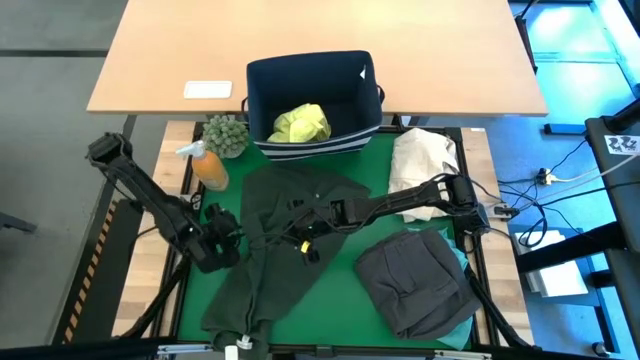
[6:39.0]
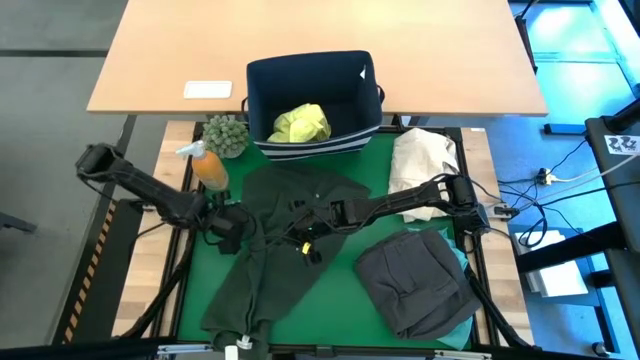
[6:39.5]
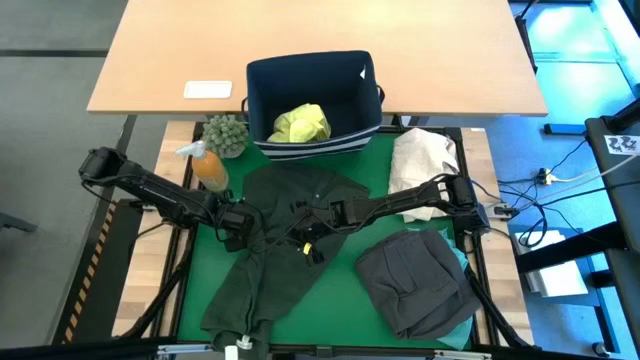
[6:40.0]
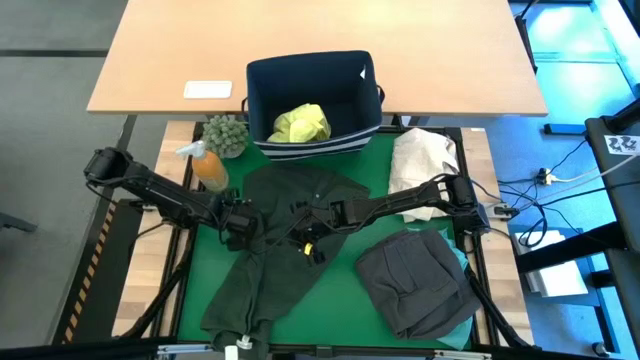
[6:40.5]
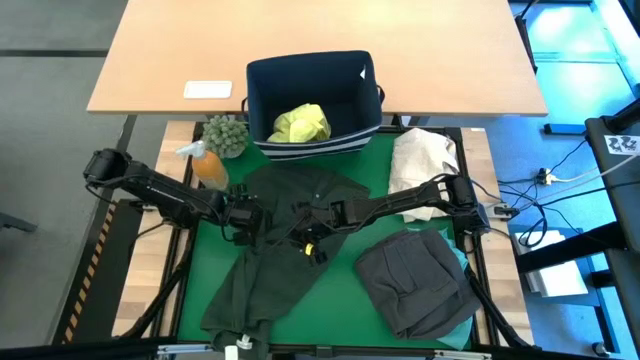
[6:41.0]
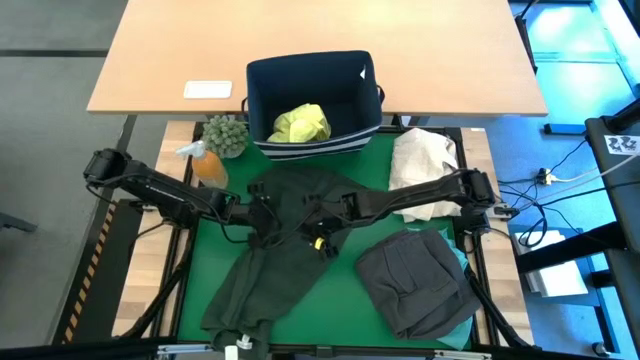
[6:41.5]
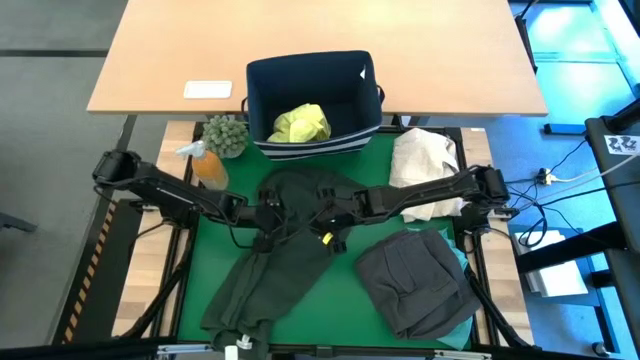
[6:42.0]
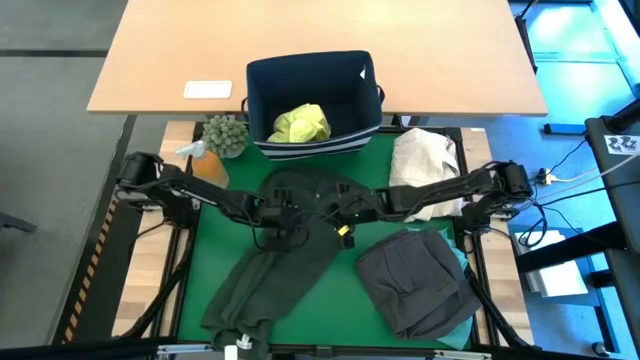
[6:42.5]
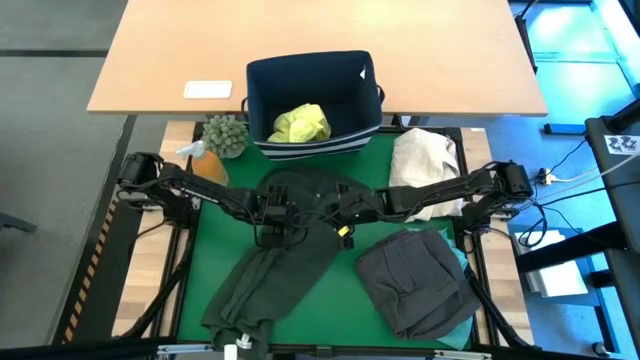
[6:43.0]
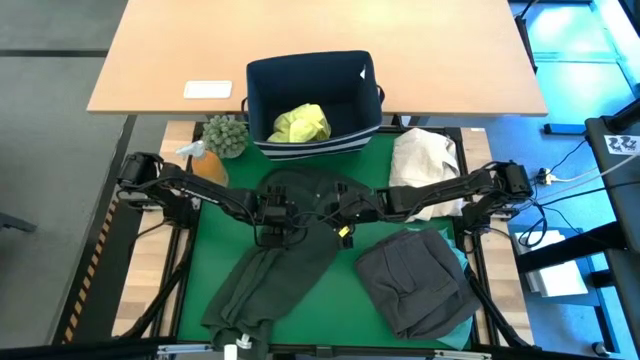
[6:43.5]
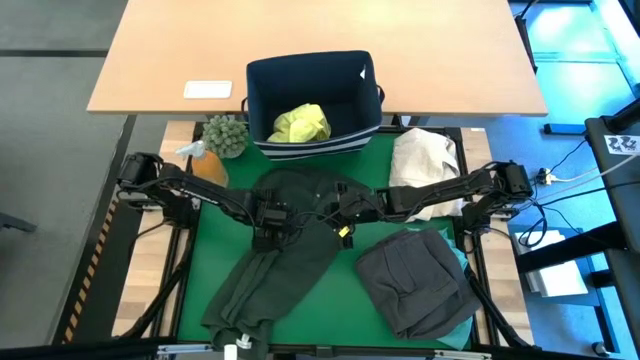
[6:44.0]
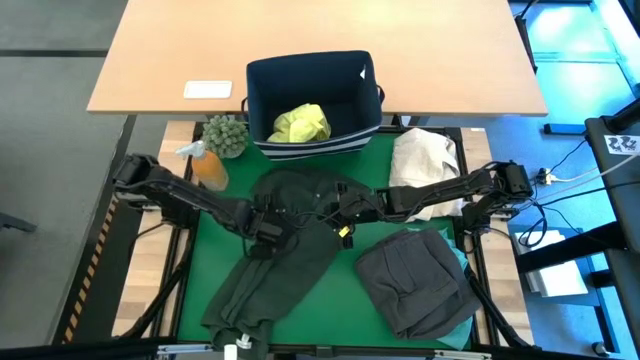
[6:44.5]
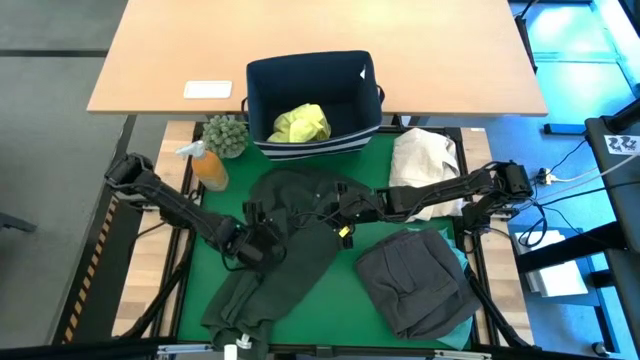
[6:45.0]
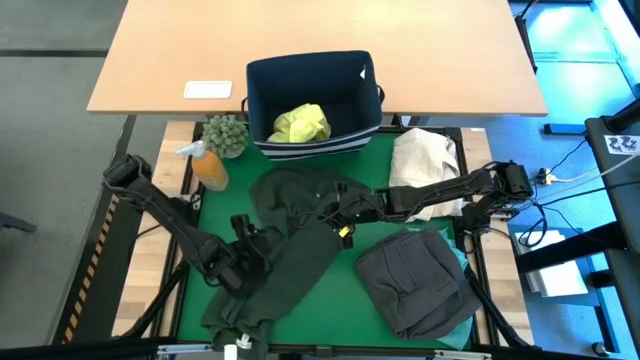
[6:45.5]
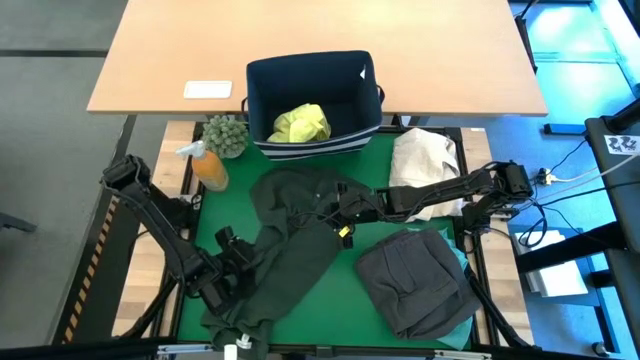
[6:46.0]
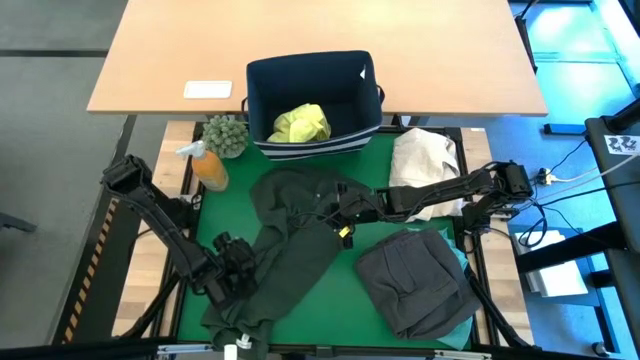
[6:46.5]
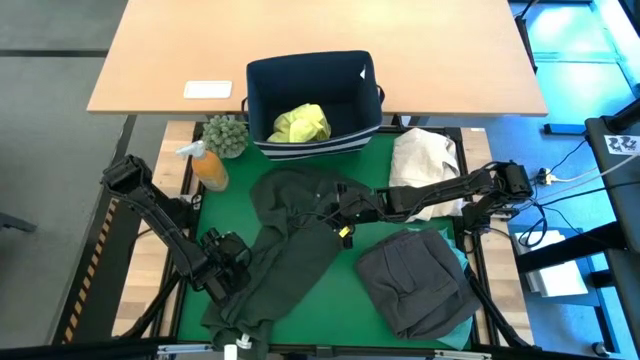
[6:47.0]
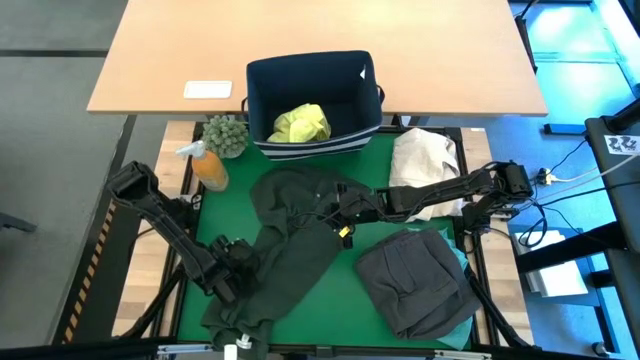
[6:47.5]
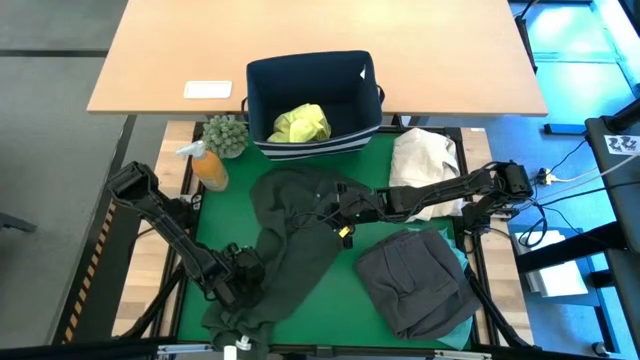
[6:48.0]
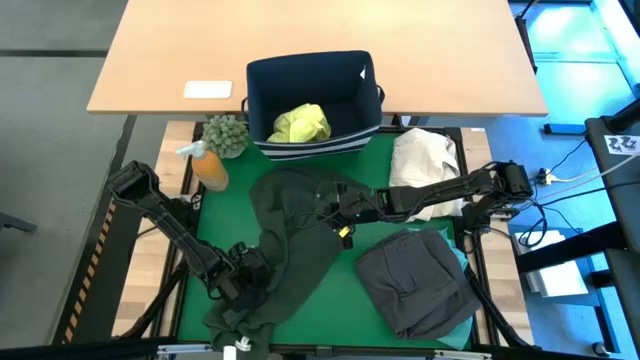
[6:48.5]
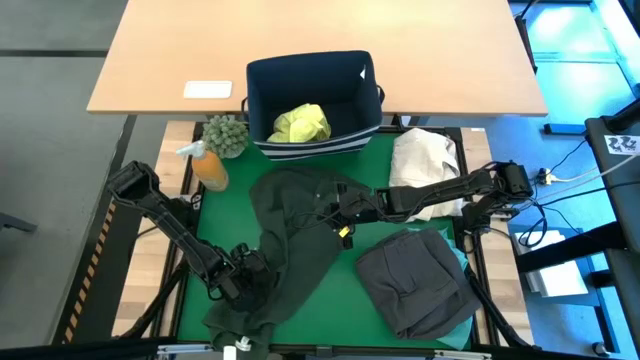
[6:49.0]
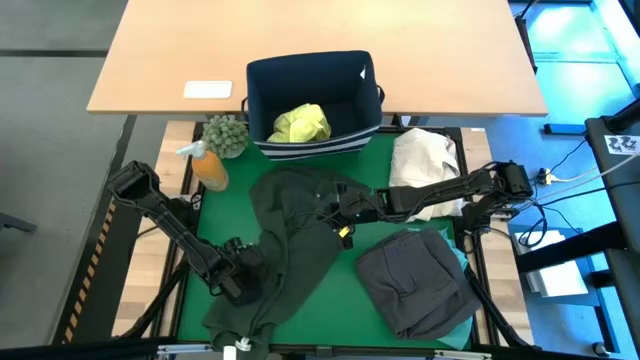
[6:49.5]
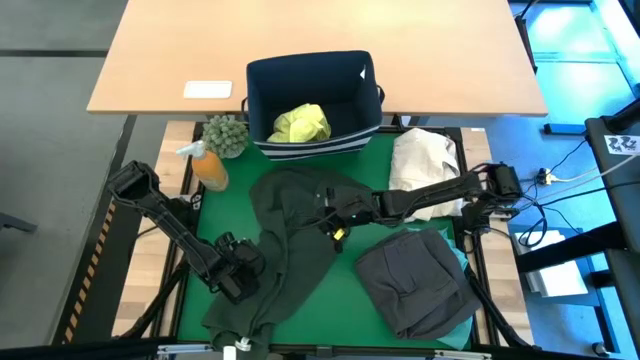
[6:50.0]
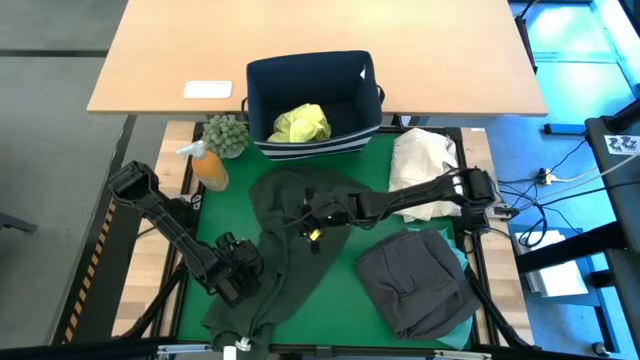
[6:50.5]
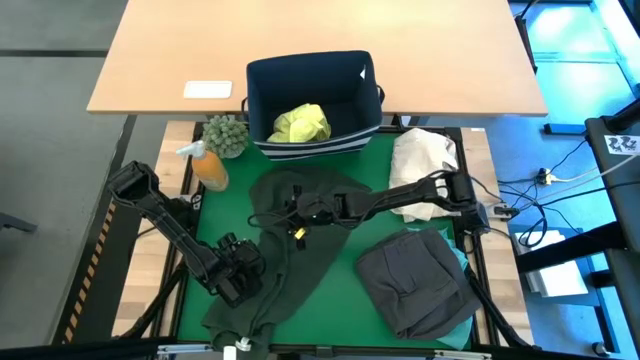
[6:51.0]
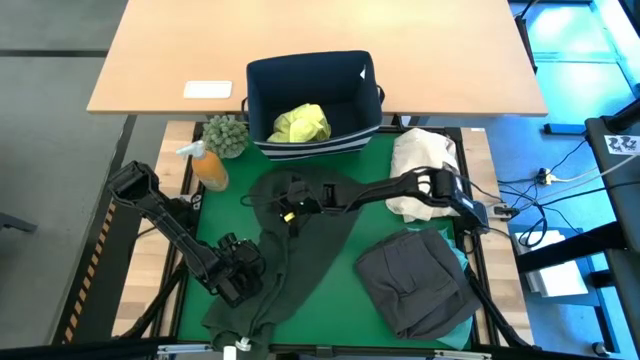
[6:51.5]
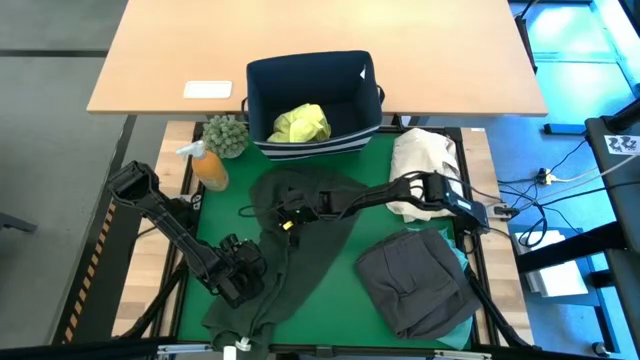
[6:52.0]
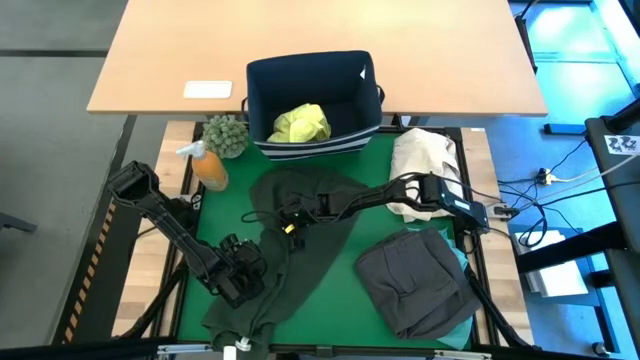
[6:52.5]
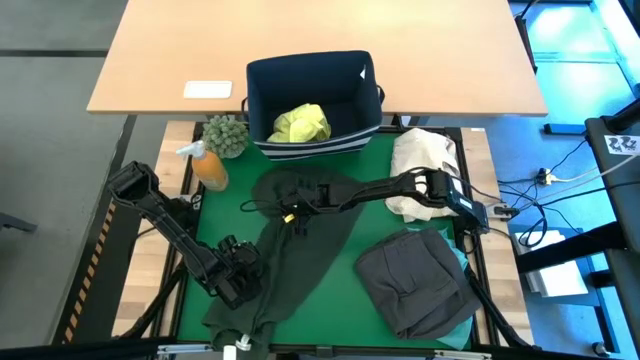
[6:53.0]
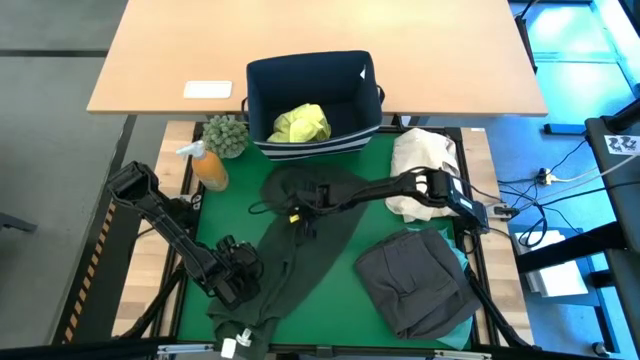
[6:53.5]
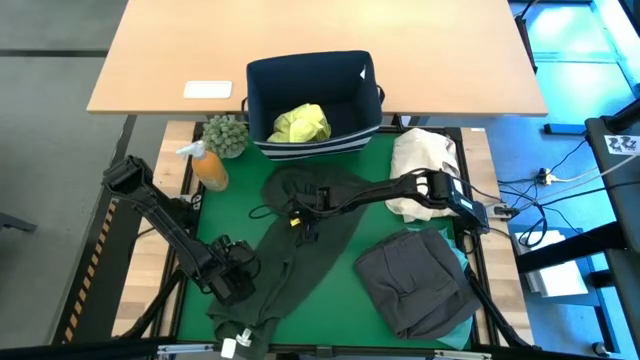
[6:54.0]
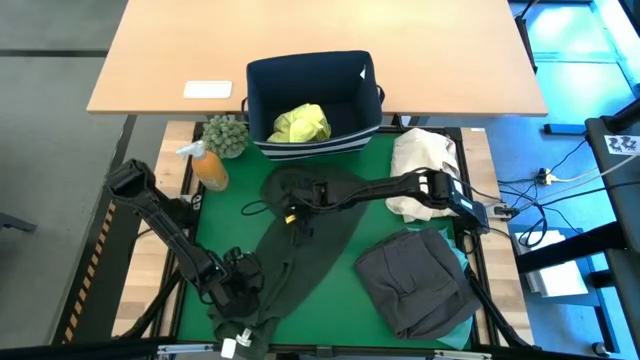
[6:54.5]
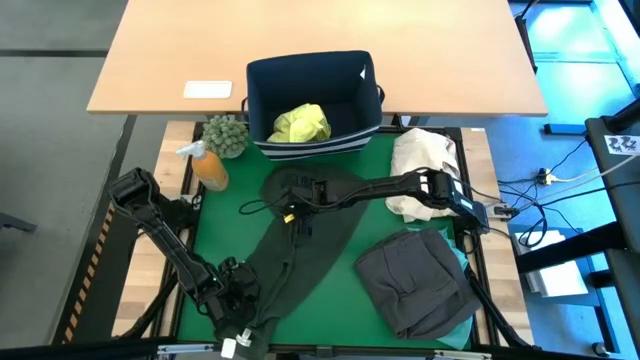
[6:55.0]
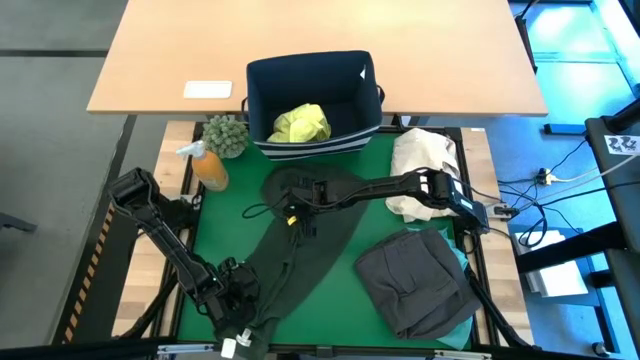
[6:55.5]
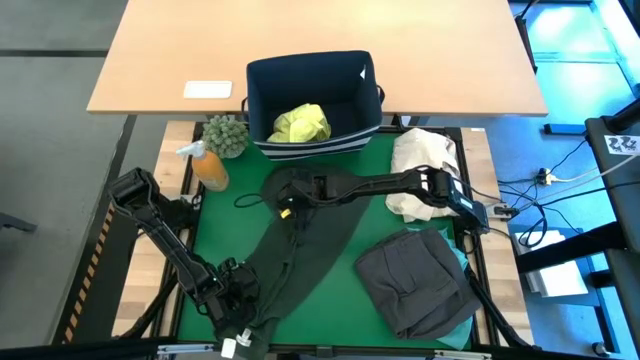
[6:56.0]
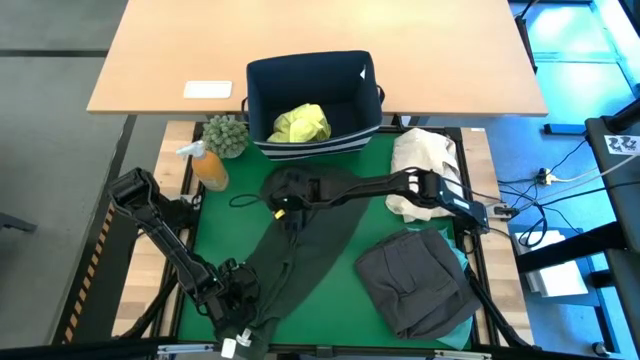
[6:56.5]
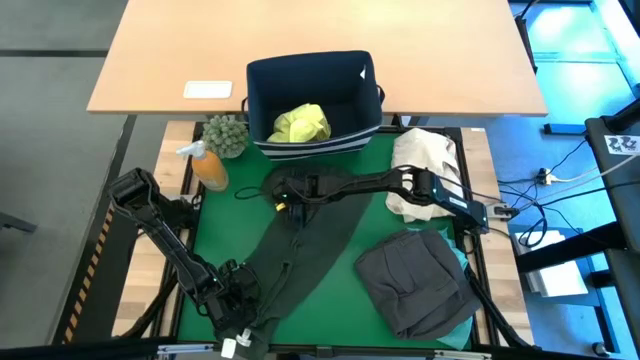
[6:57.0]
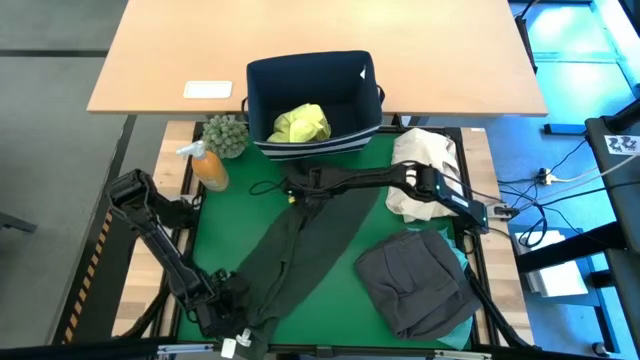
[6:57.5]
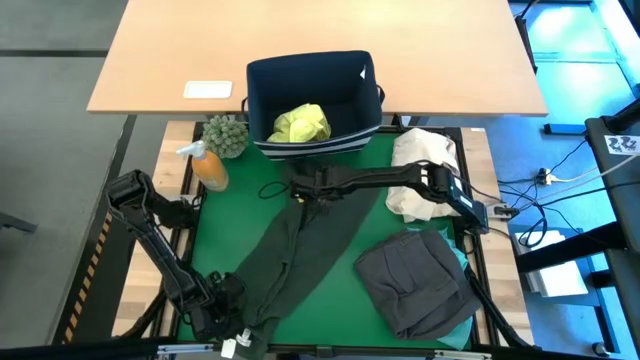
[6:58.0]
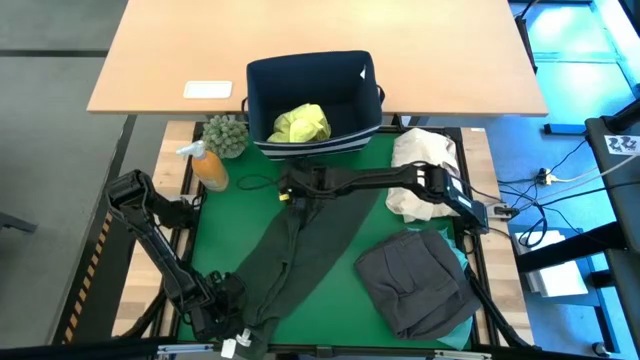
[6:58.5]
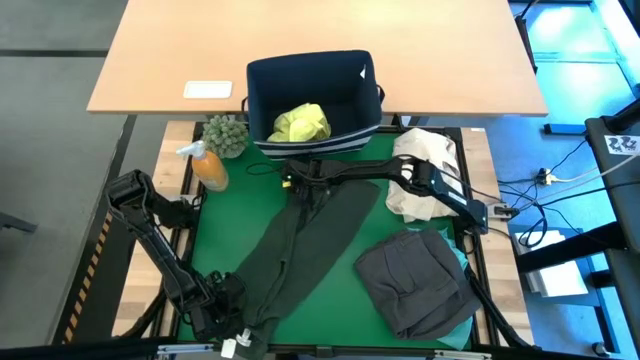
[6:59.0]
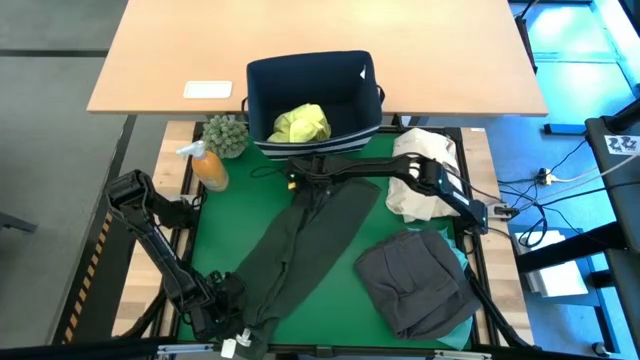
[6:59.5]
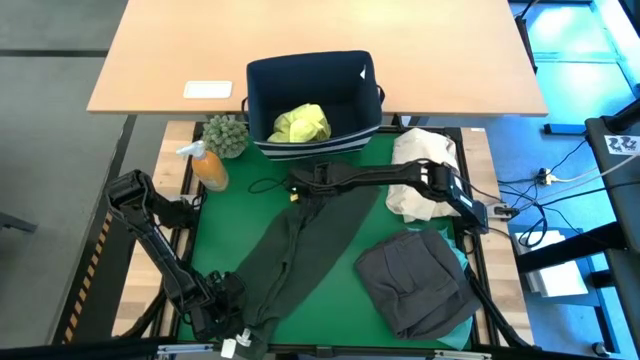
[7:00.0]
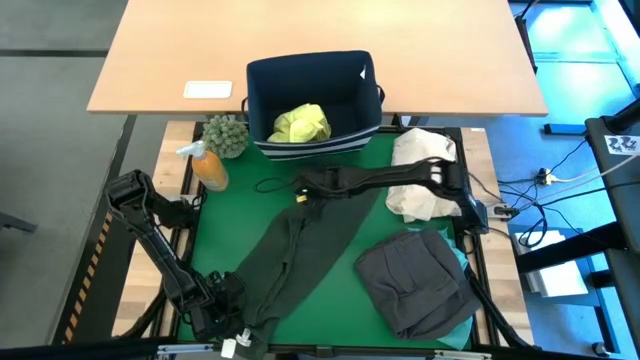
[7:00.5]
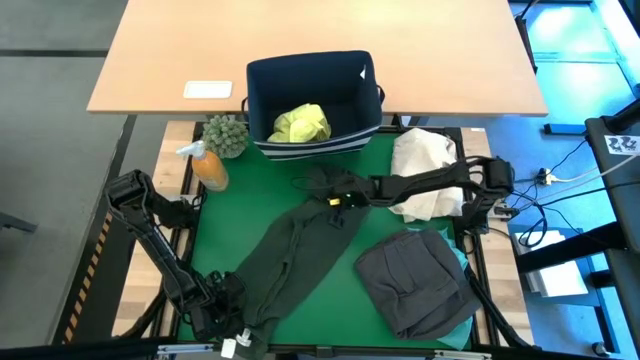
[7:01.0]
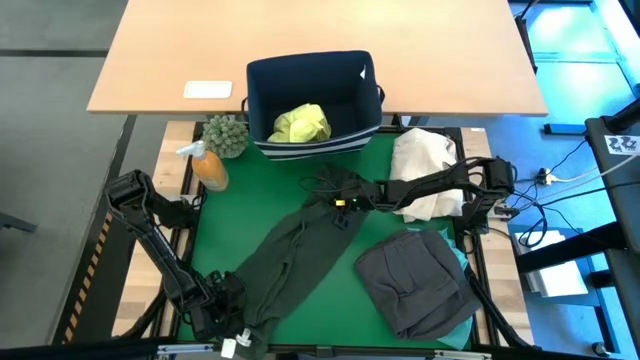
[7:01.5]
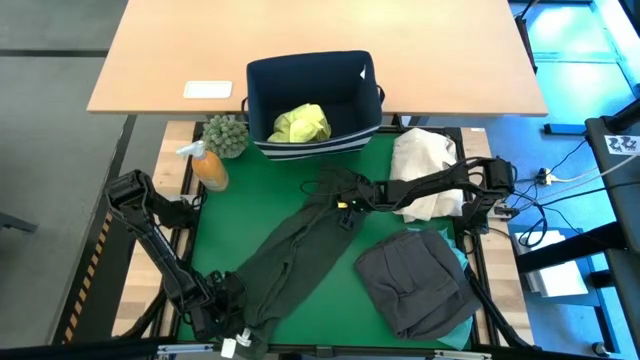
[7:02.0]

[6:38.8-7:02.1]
Task: Fold laundry
Fold the green polo shirt
